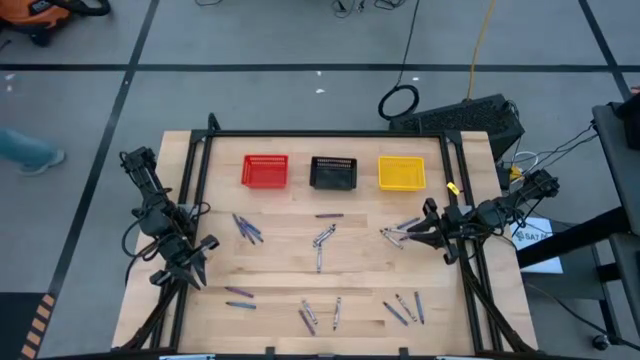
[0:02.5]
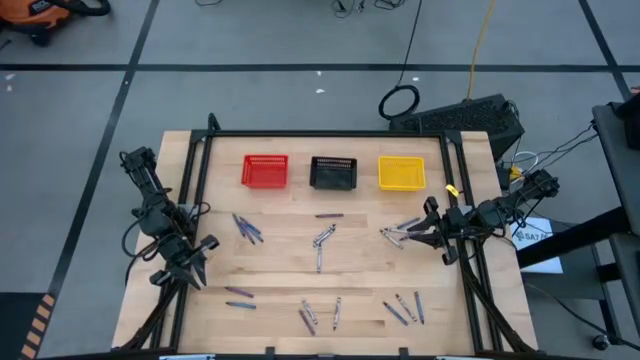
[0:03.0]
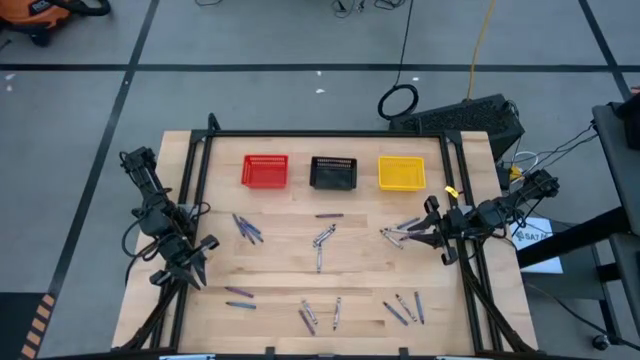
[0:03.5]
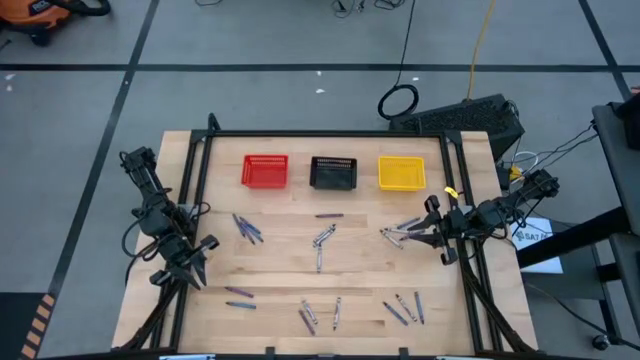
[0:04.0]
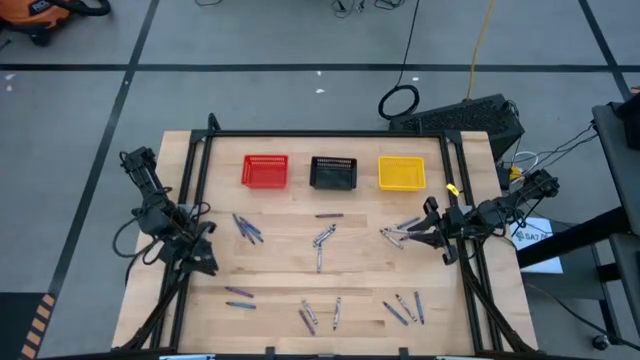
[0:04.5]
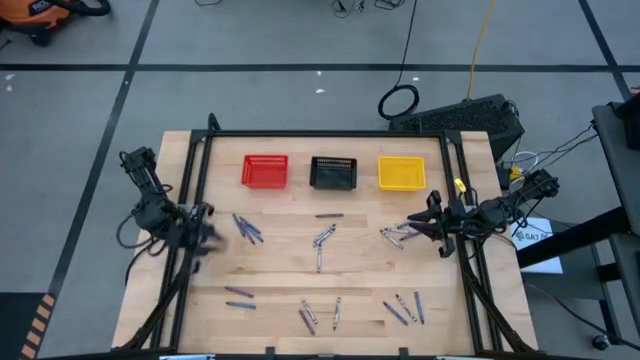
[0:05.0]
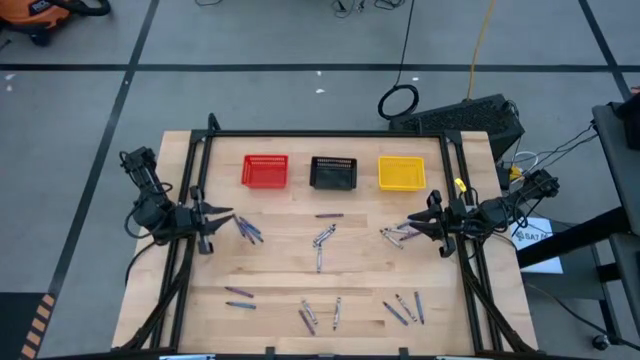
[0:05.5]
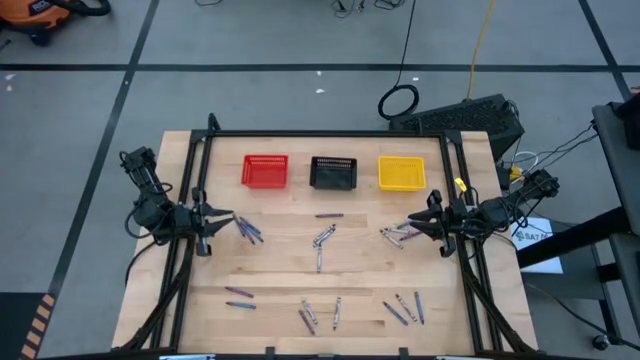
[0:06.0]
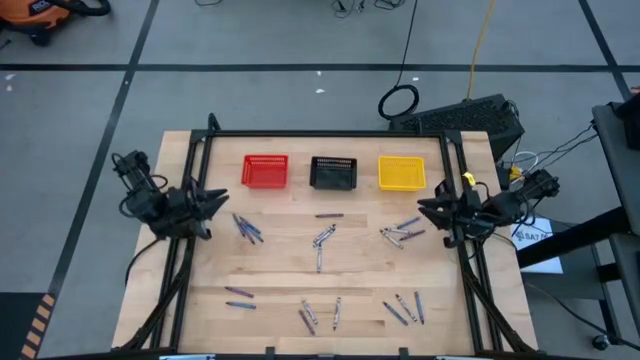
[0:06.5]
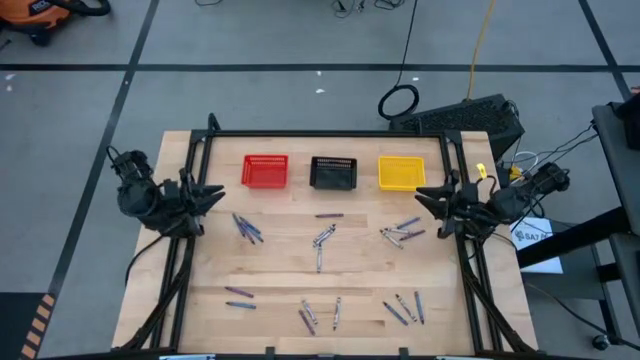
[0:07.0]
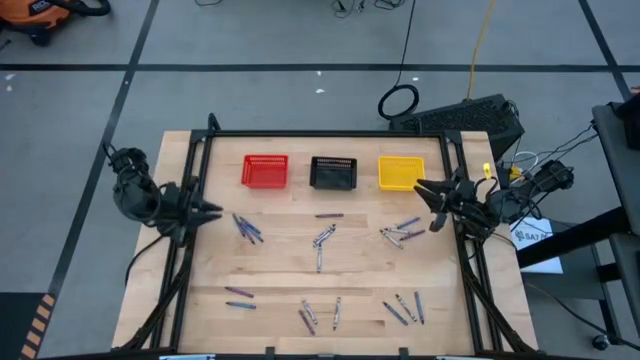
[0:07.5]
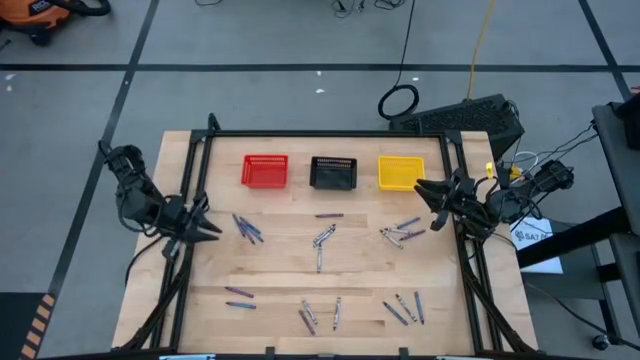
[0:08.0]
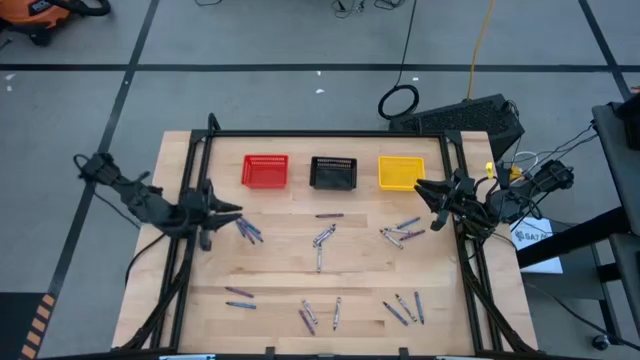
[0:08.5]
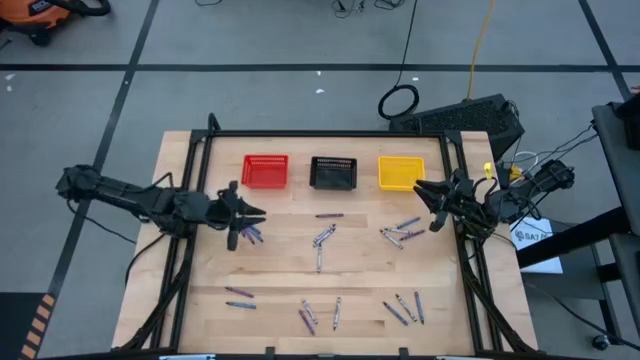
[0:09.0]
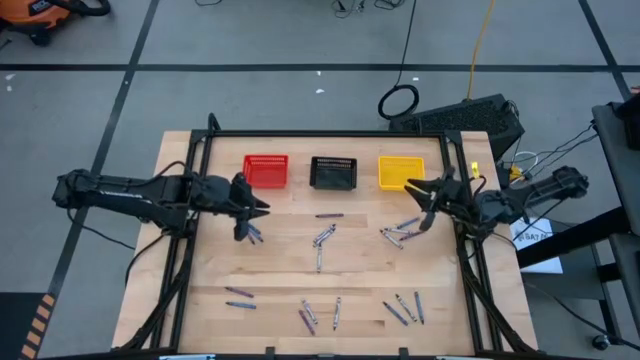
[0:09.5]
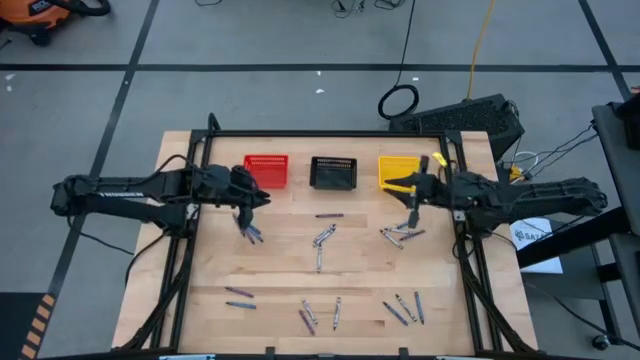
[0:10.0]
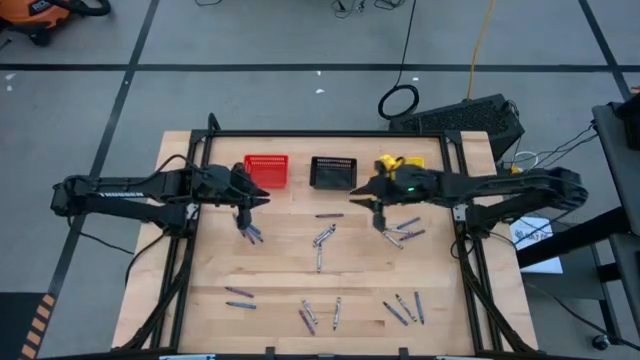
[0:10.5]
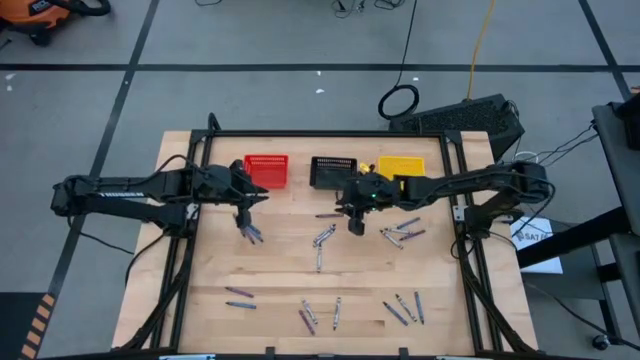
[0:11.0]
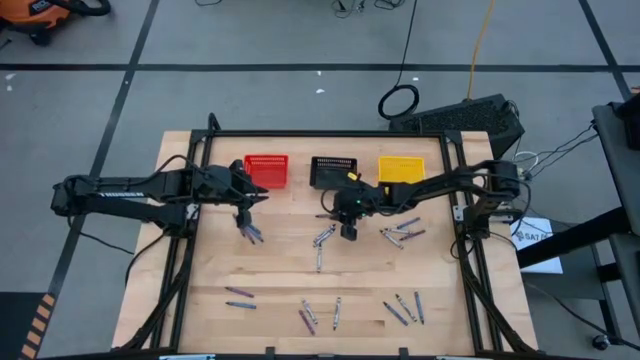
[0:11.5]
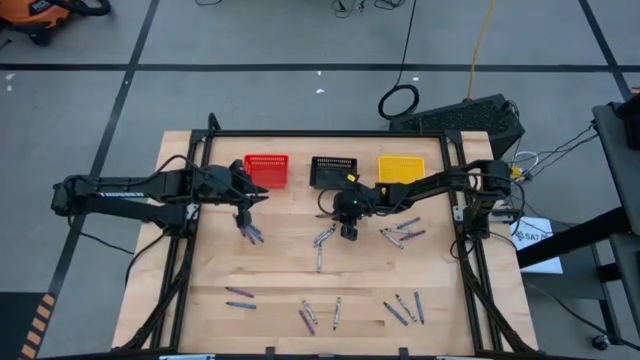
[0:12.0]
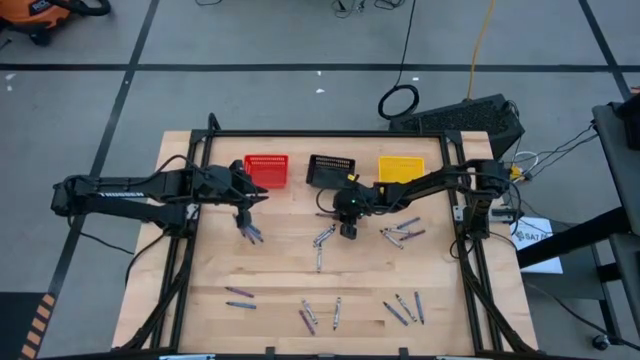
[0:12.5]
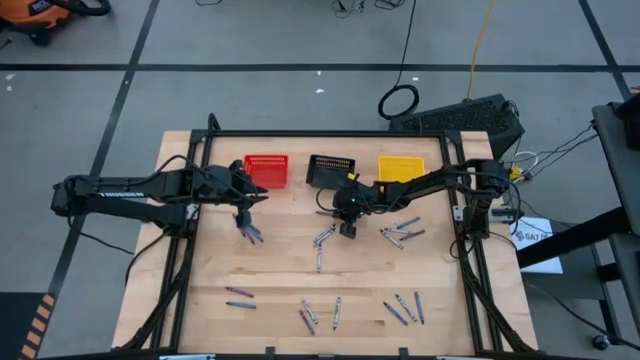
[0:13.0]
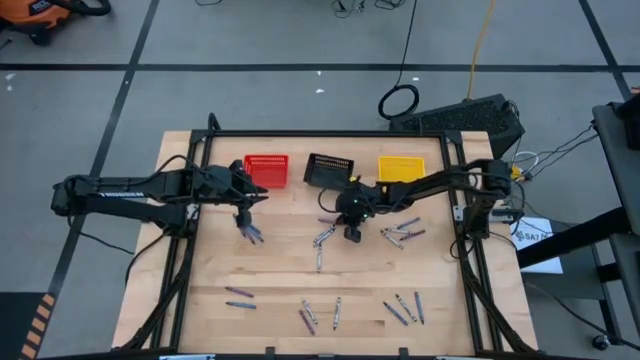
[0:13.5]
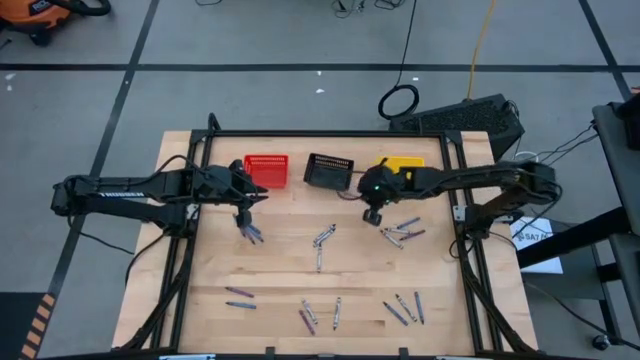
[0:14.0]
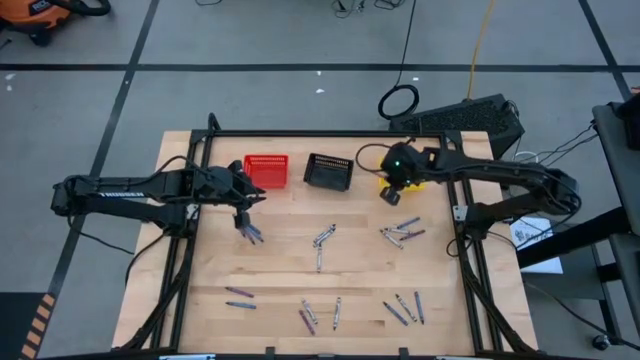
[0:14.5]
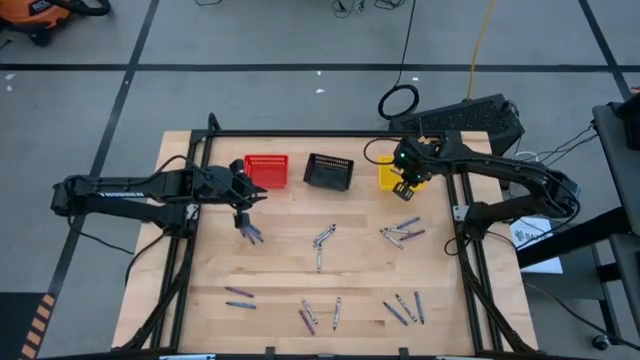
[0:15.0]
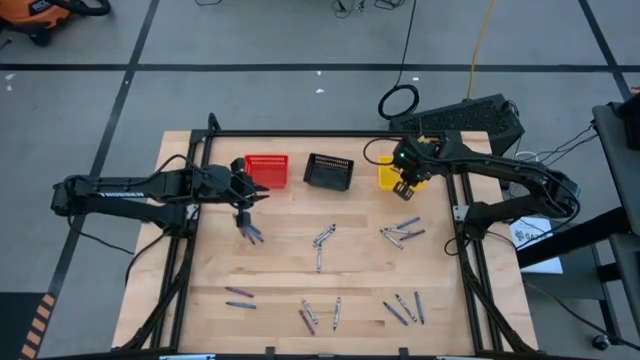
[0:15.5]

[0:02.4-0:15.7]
Task: Sort crayons
Put the violet crayon into the yellow bin

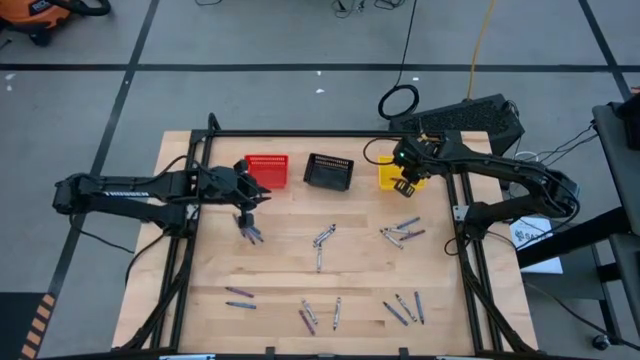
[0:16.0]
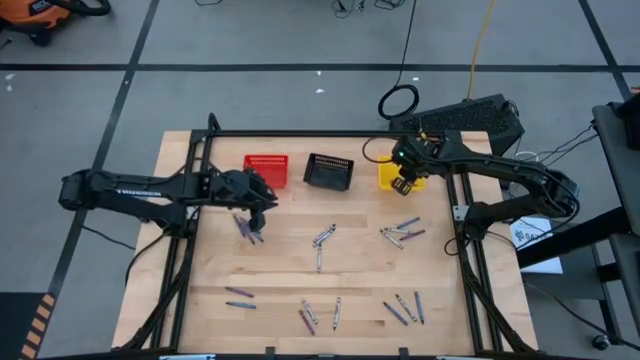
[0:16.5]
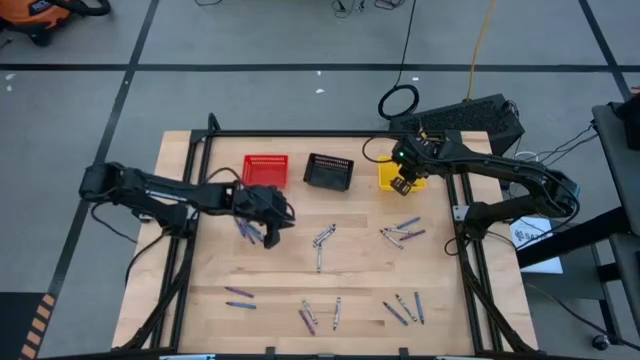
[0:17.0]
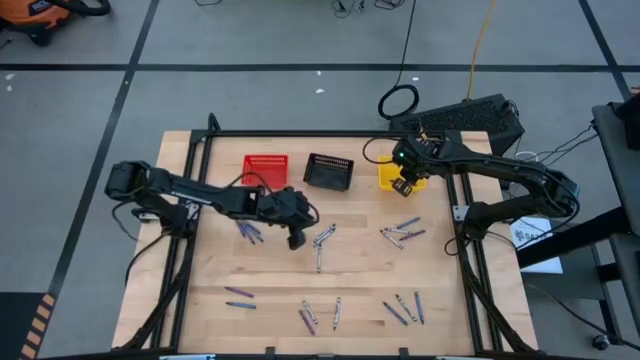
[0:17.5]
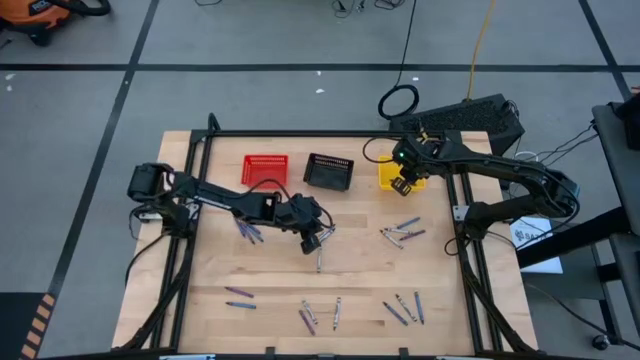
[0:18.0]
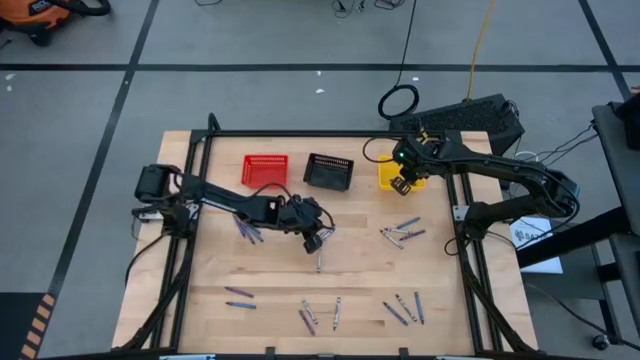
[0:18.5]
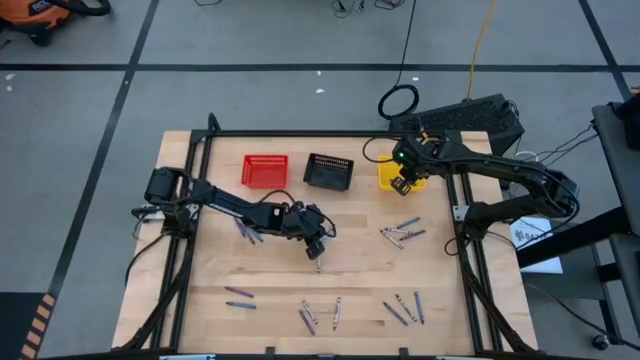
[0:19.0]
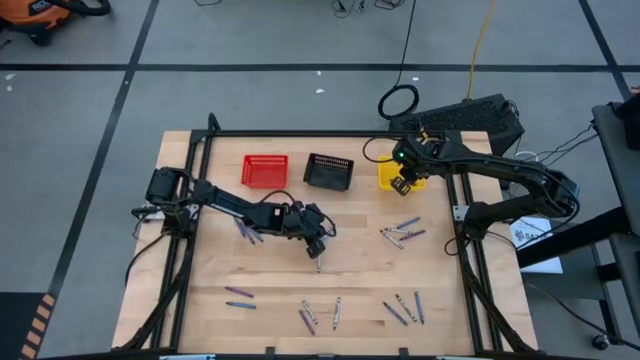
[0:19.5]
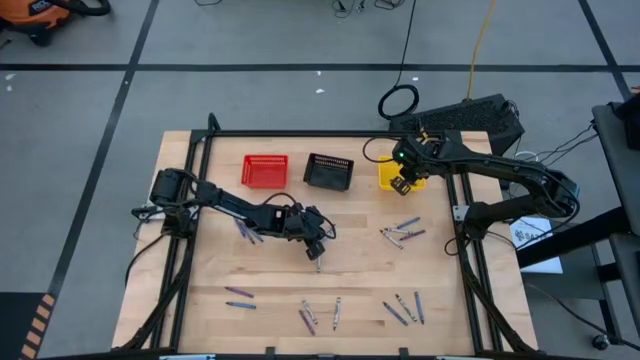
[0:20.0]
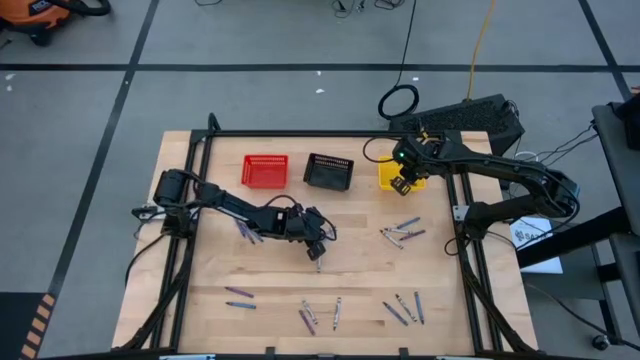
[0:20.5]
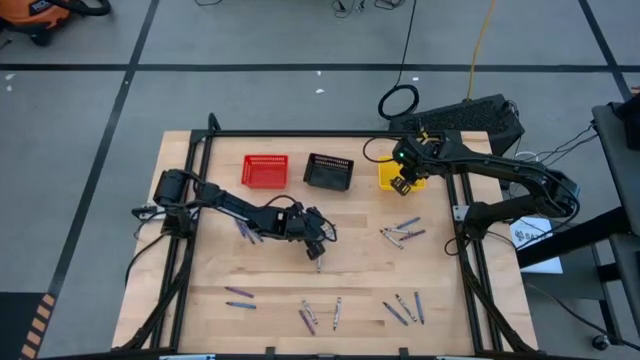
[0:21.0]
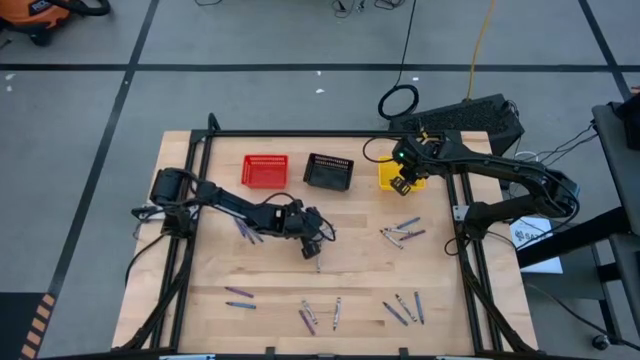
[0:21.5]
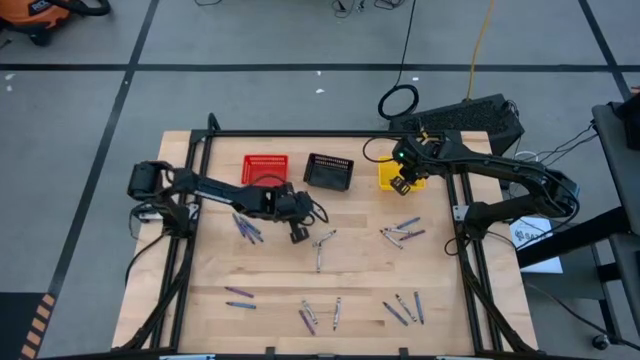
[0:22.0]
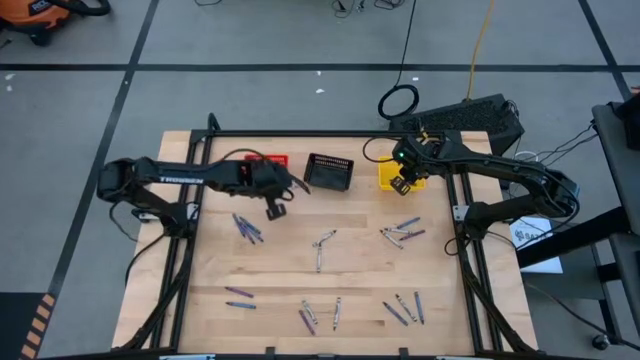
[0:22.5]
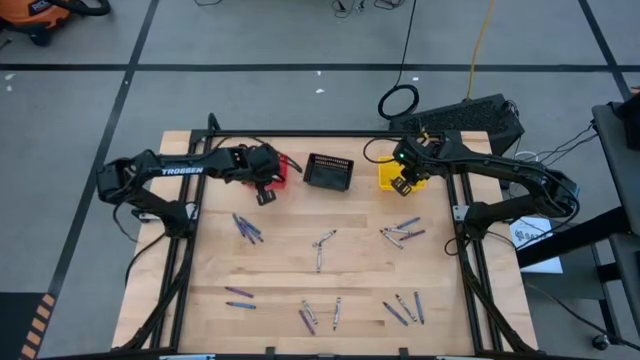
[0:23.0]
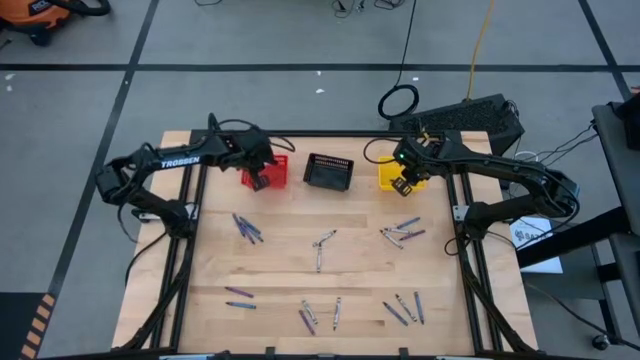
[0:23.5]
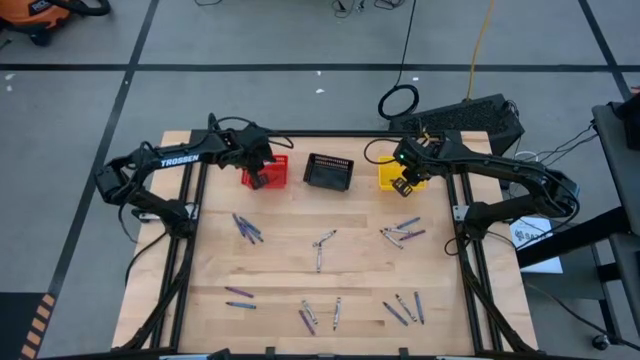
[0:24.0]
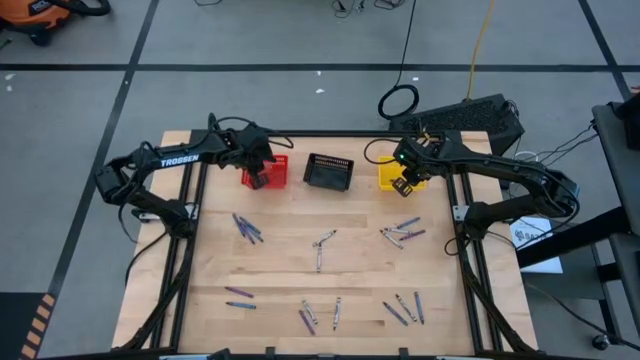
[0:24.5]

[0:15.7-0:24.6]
Put the gray crayon into the red bin
